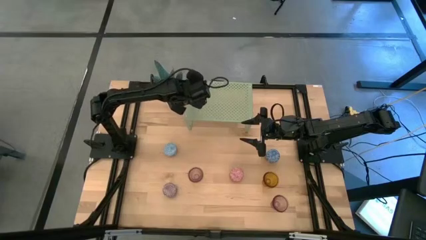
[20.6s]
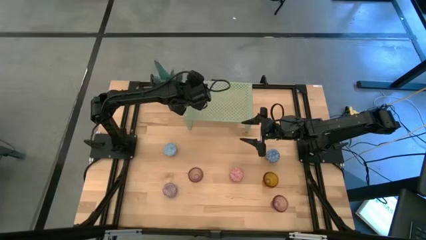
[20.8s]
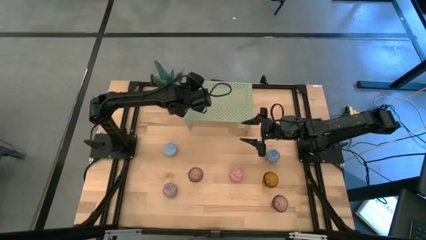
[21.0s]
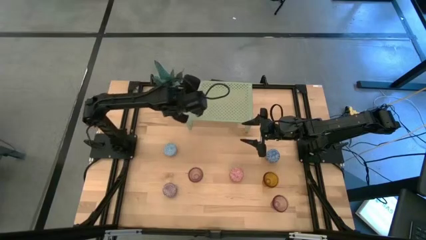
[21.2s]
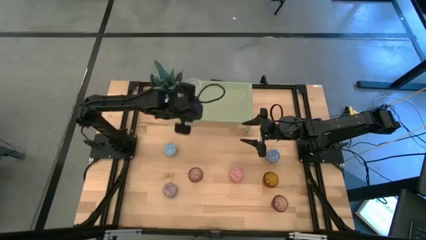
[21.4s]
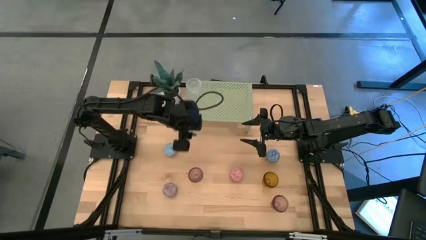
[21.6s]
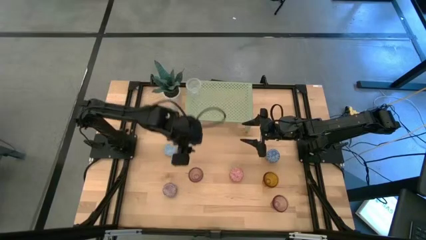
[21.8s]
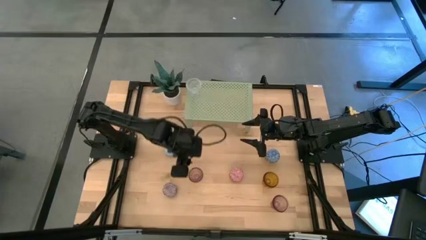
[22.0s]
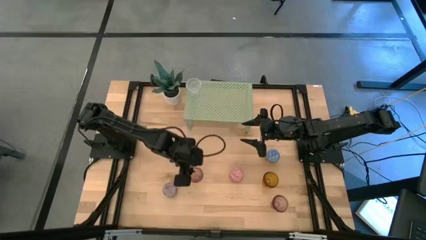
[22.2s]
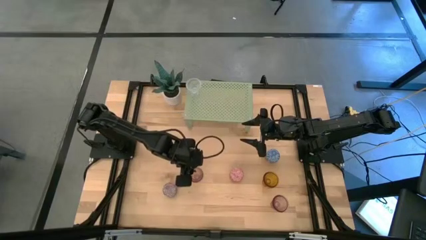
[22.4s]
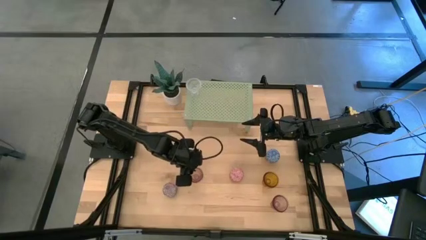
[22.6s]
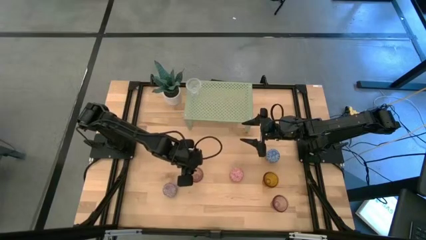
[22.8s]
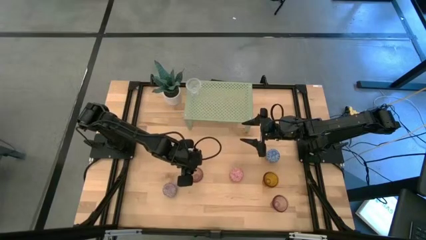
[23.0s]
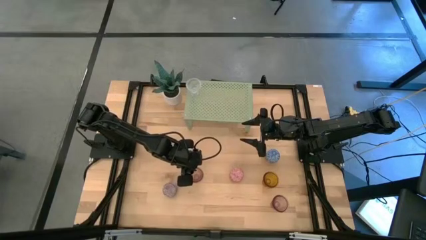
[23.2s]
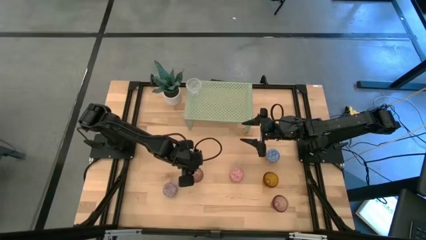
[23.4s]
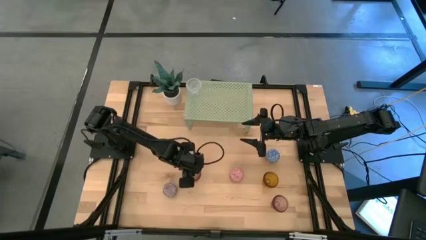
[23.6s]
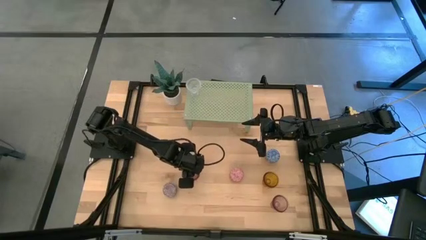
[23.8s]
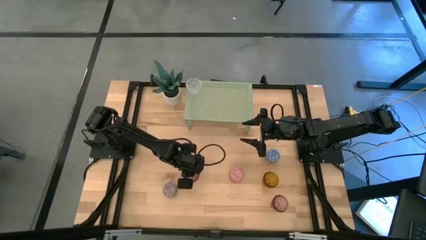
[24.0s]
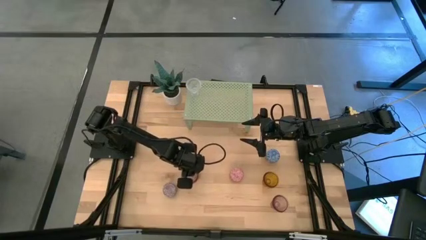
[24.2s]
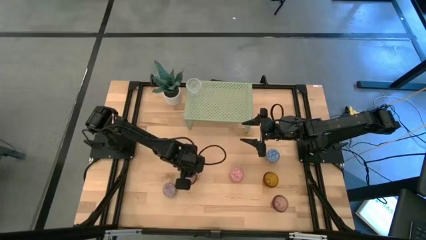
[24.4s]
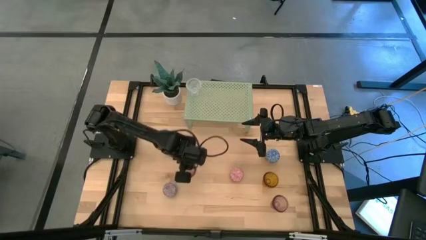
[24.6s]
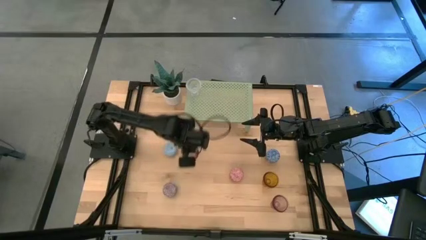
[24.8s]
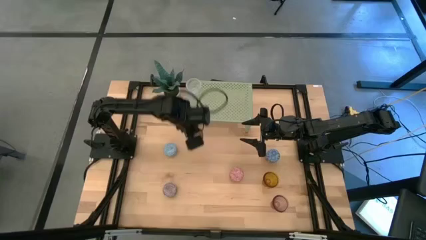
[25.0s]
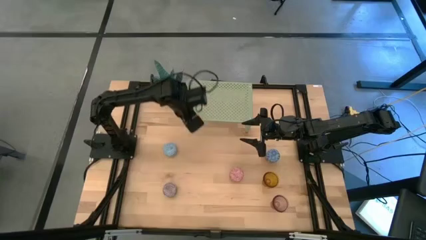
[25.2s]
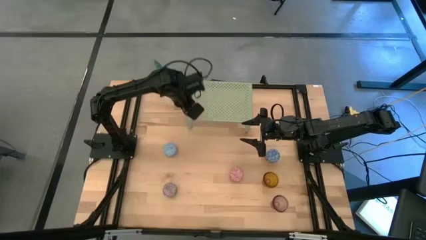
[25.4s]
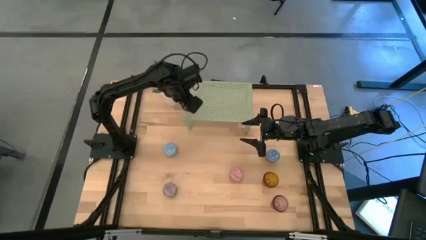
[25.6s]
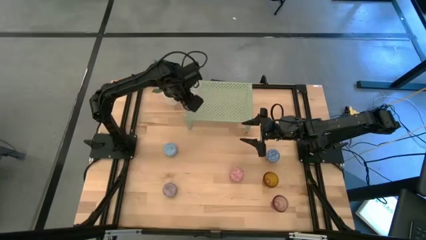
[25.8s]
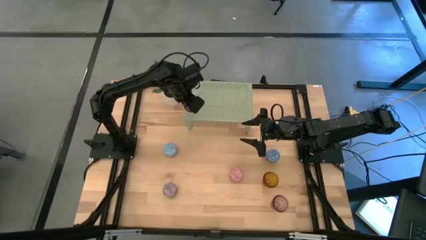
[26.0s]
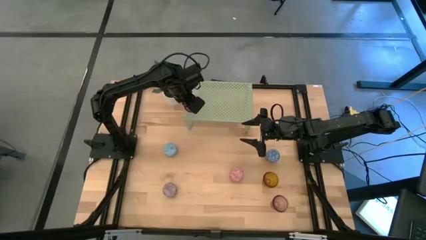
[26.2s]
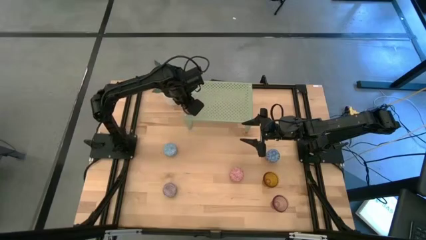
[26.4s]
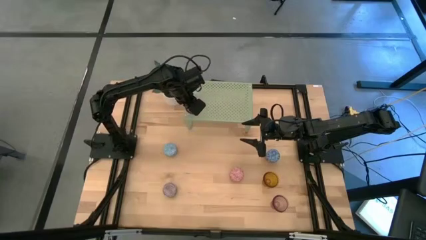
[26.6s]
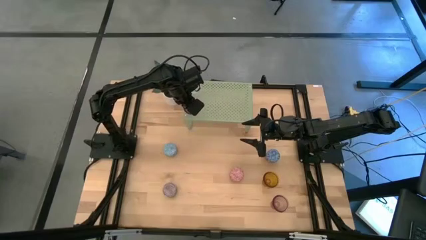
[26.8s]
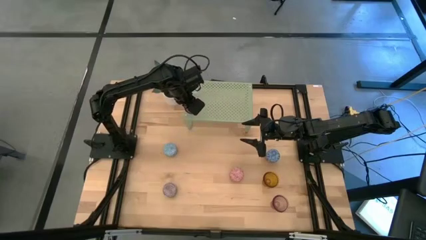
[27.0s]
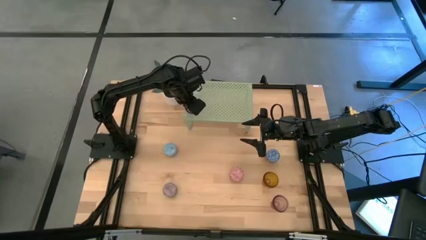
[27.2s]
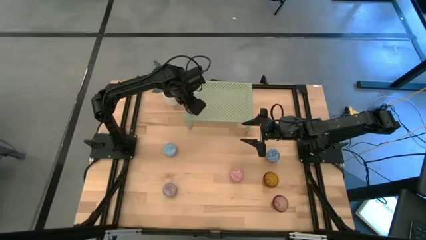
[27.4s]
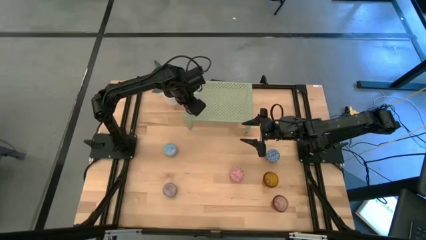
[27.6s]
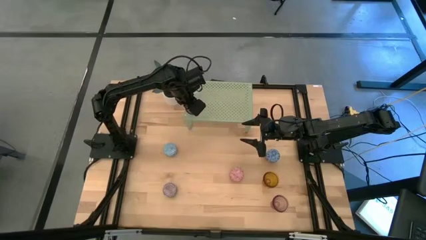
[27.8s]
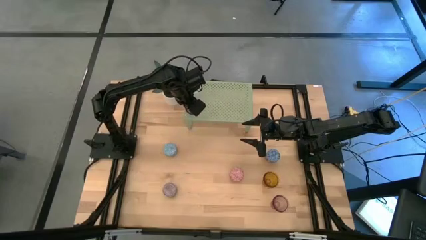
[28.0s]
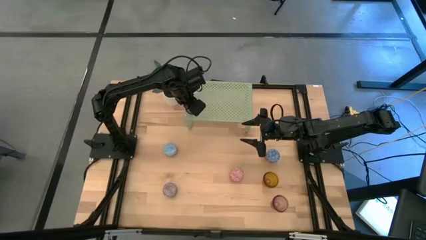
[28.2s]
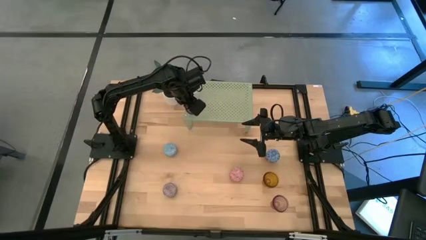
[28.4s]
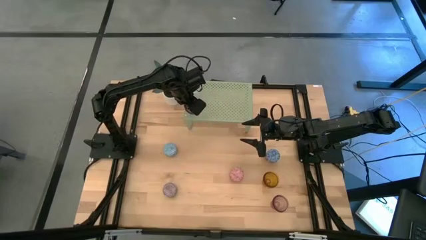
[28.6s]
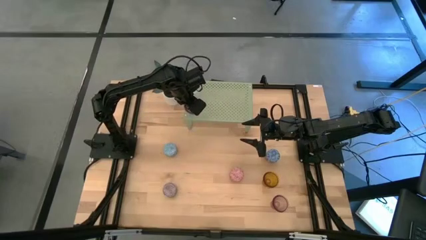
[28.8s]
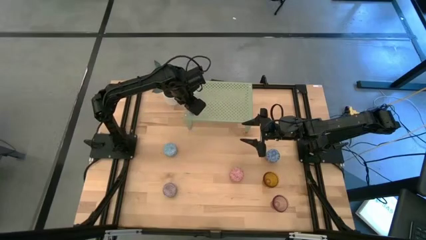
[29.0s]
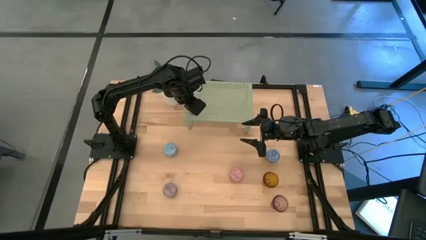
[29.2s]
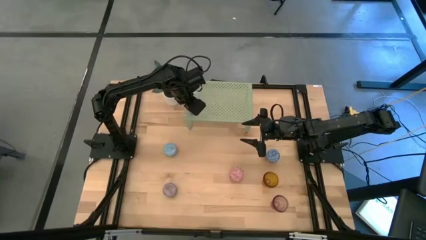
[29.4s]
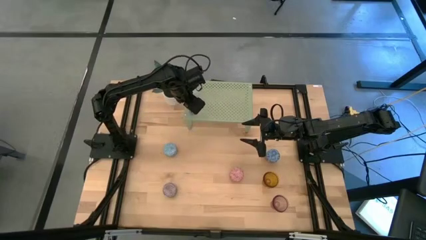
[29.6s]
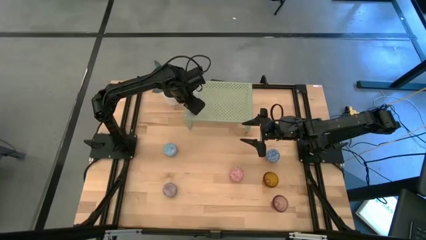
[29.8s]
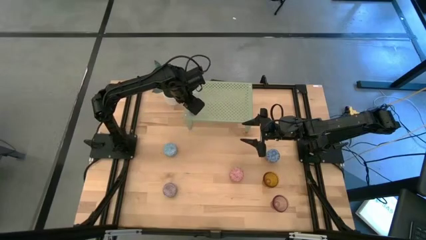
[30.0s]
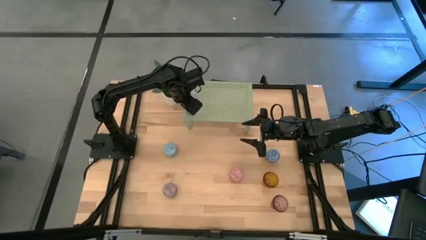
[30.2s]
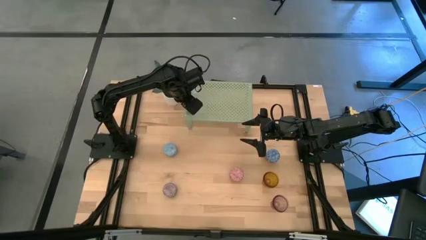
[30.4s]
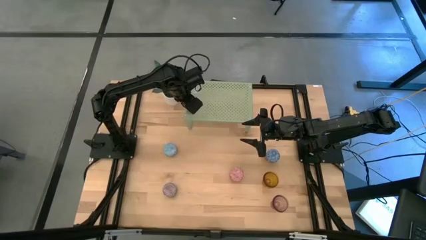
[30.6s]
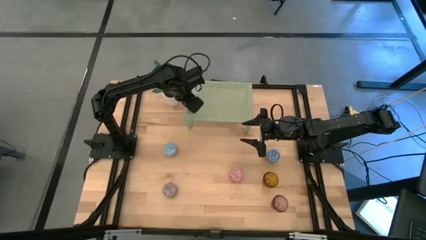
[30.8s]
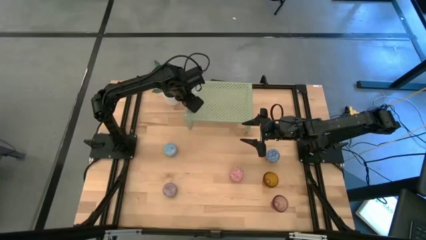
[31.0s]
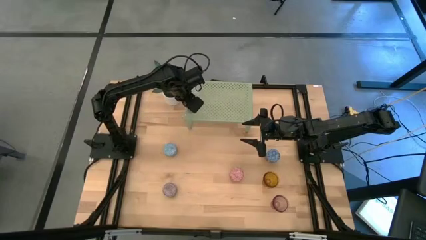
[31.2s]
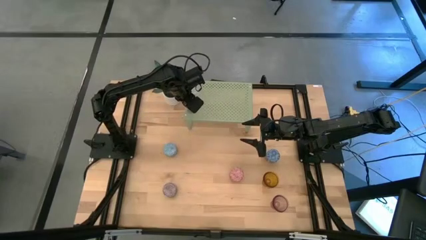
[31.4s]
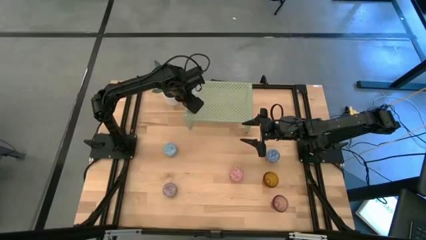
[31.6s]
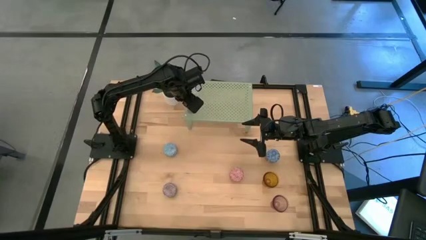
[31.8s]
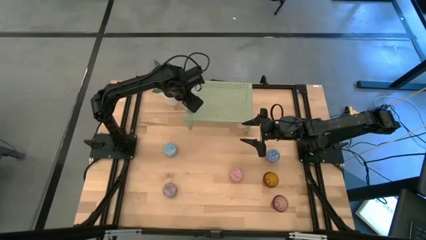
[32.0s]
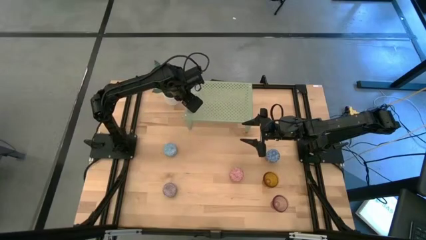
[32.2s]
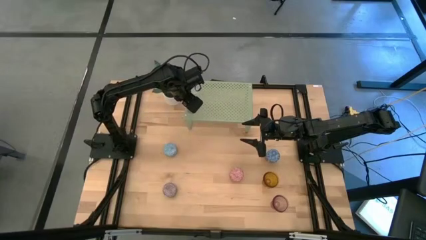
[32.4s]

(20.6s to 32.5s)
Task: Pick & Place candle stick holders
Put the left pink glass candle holder on the shelf
